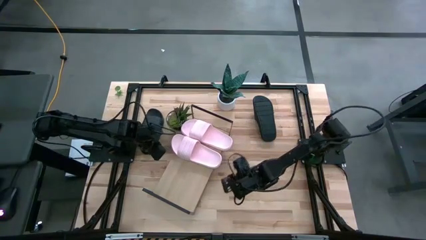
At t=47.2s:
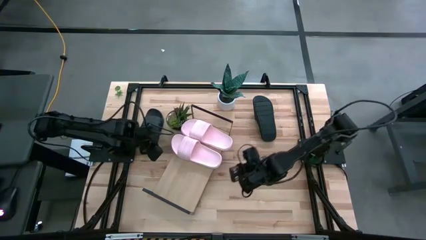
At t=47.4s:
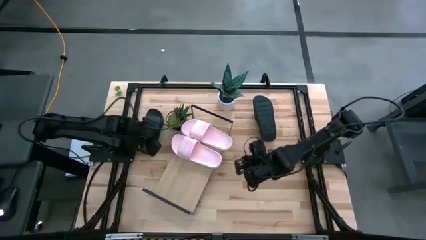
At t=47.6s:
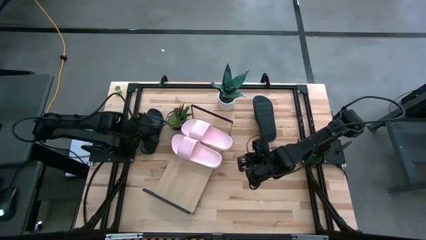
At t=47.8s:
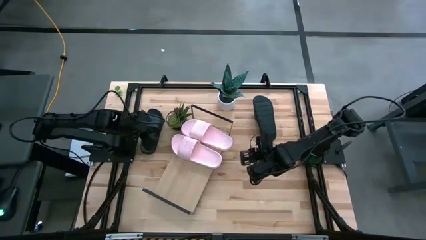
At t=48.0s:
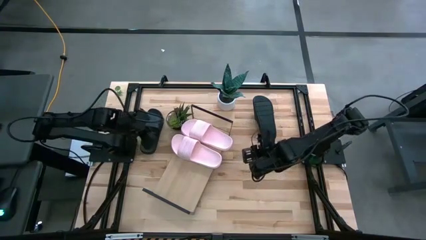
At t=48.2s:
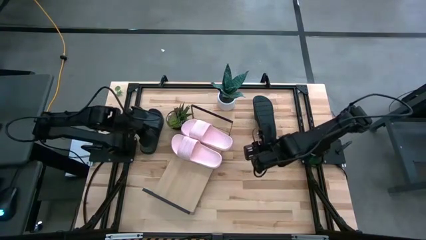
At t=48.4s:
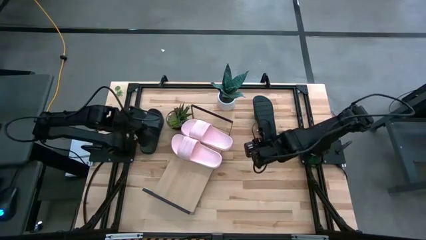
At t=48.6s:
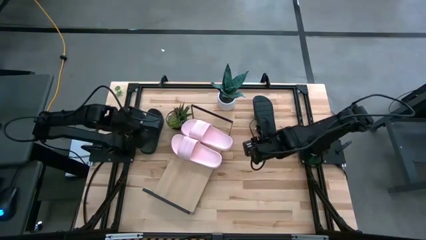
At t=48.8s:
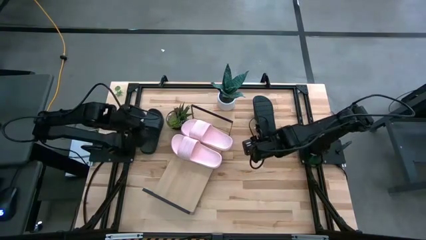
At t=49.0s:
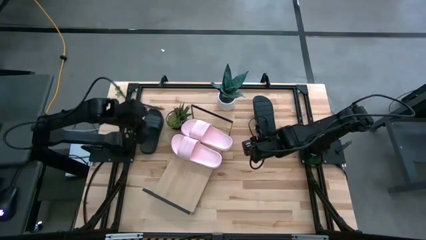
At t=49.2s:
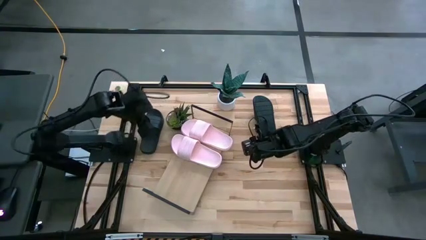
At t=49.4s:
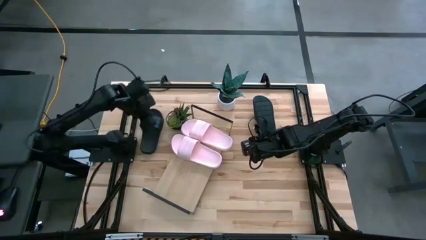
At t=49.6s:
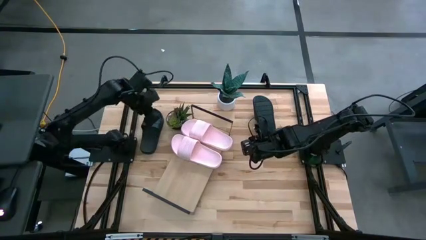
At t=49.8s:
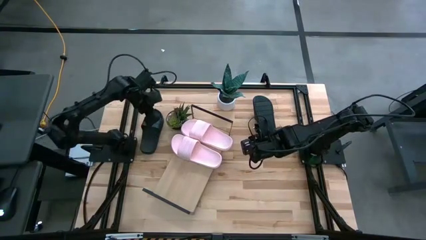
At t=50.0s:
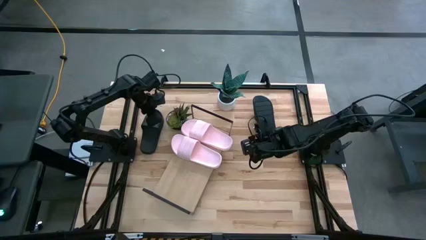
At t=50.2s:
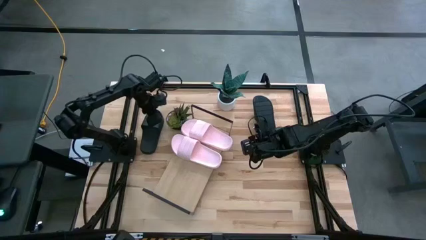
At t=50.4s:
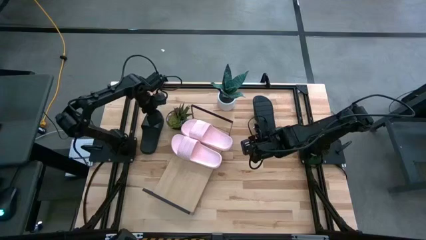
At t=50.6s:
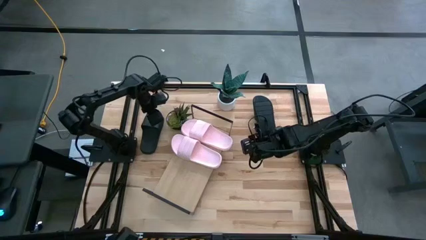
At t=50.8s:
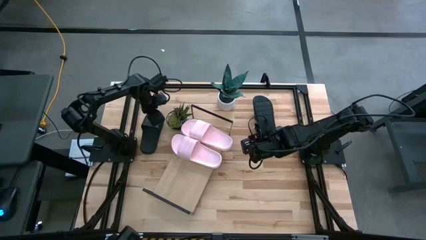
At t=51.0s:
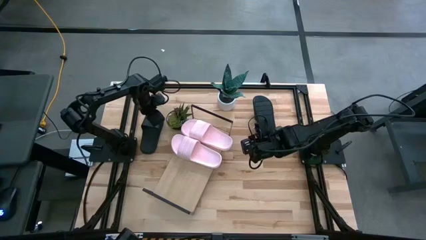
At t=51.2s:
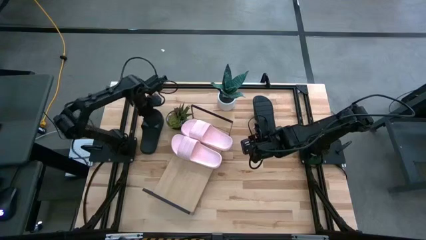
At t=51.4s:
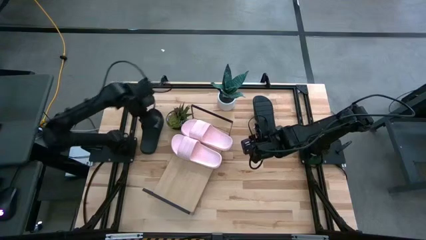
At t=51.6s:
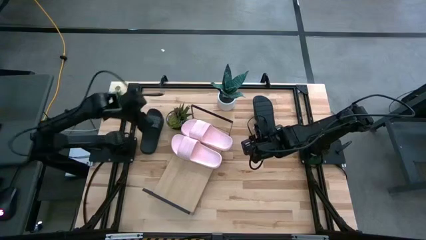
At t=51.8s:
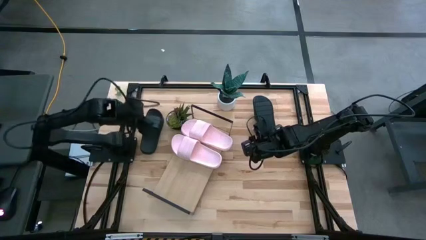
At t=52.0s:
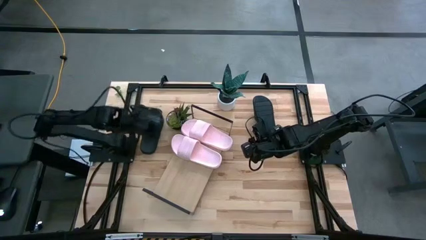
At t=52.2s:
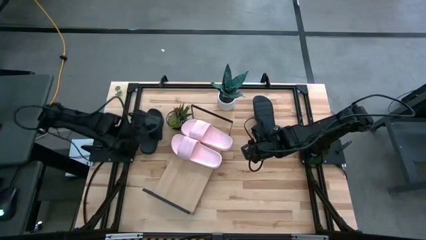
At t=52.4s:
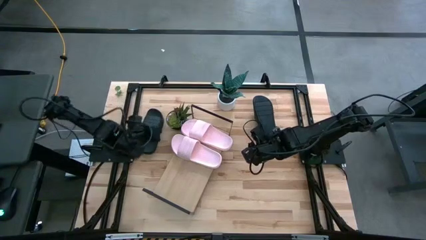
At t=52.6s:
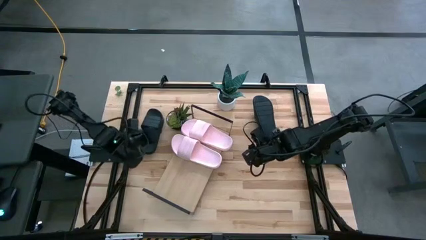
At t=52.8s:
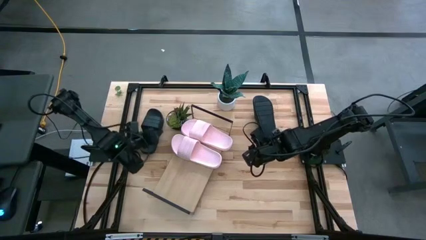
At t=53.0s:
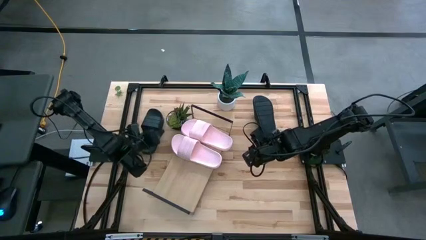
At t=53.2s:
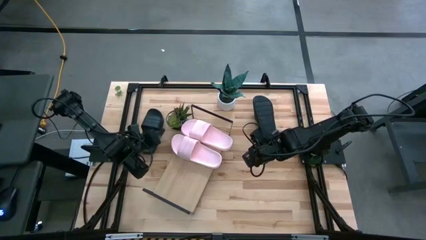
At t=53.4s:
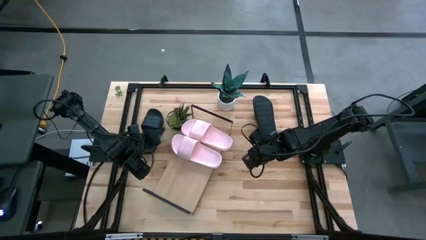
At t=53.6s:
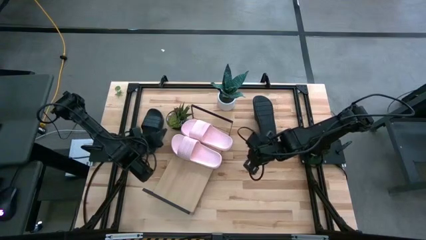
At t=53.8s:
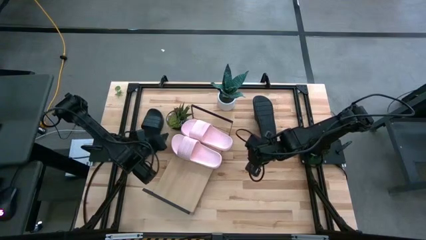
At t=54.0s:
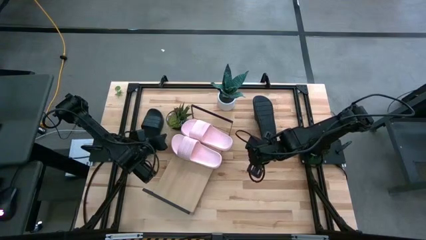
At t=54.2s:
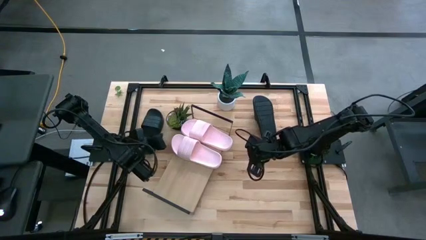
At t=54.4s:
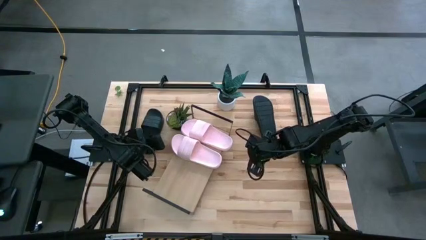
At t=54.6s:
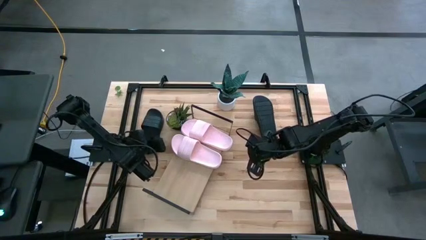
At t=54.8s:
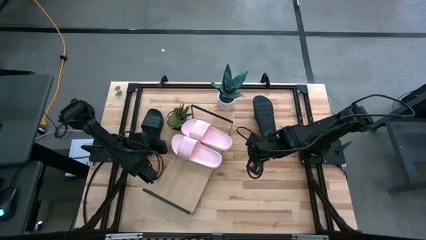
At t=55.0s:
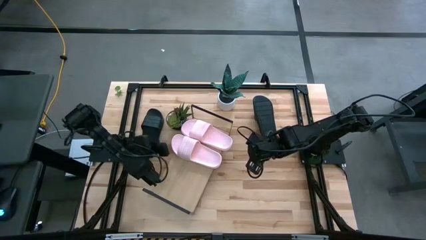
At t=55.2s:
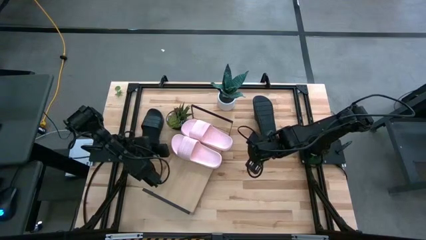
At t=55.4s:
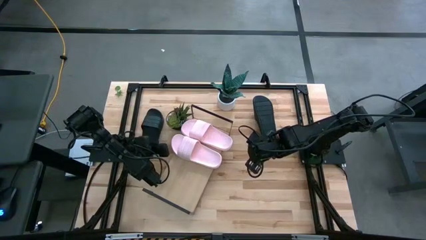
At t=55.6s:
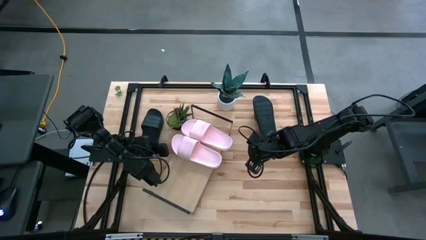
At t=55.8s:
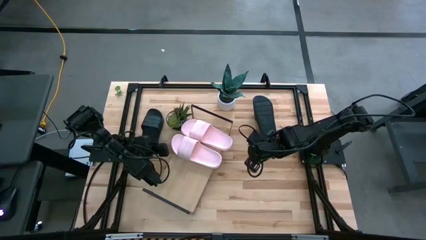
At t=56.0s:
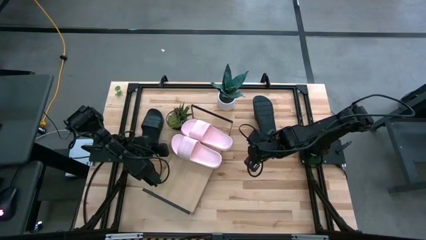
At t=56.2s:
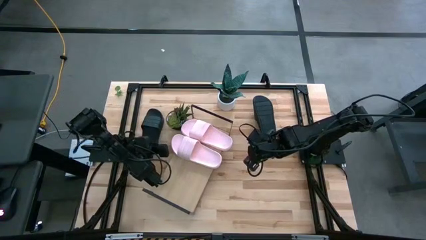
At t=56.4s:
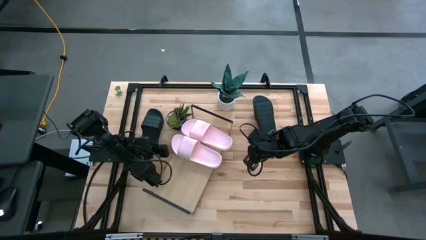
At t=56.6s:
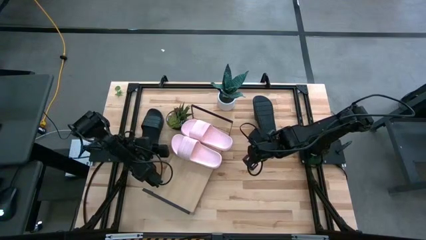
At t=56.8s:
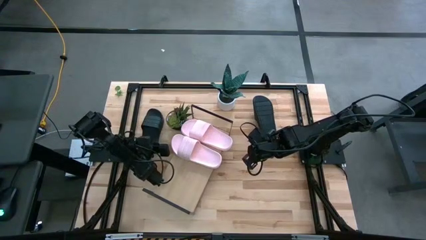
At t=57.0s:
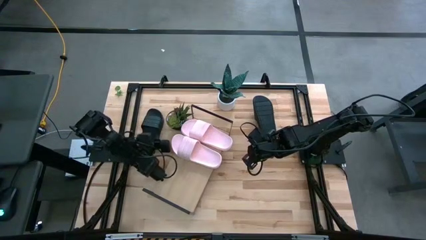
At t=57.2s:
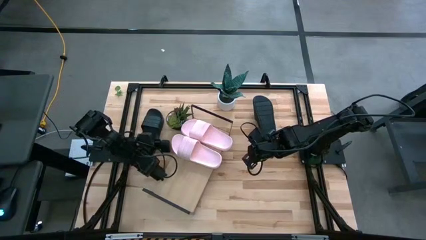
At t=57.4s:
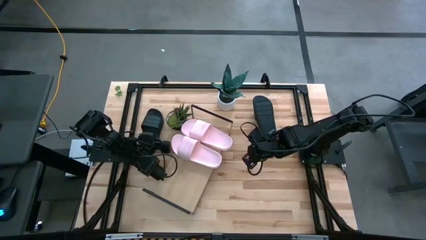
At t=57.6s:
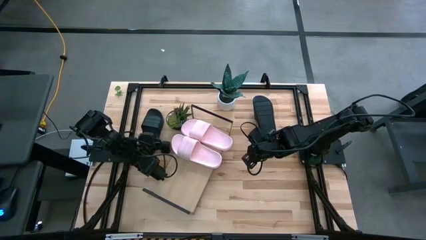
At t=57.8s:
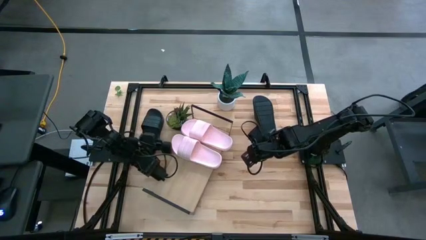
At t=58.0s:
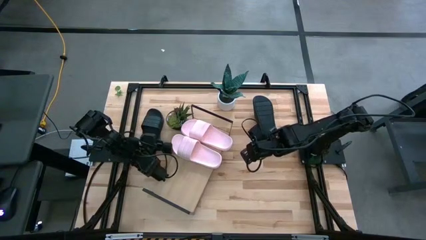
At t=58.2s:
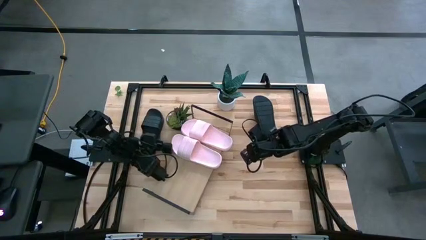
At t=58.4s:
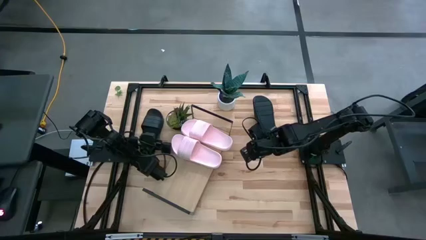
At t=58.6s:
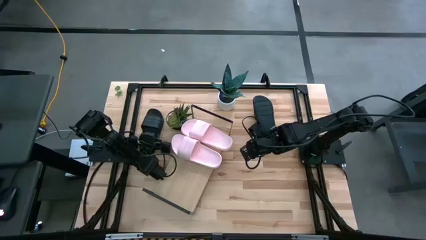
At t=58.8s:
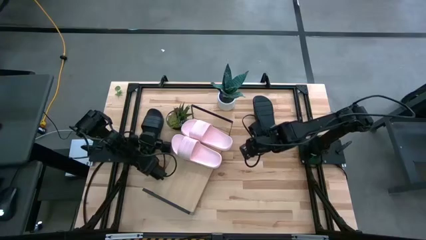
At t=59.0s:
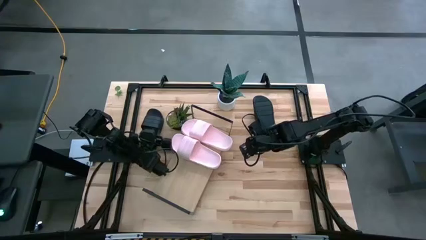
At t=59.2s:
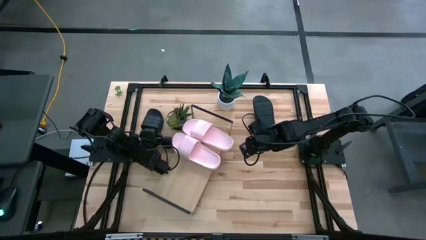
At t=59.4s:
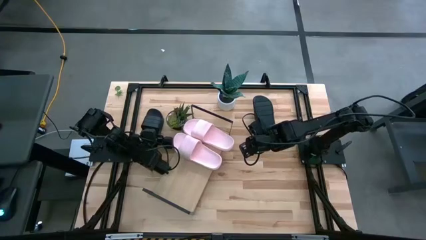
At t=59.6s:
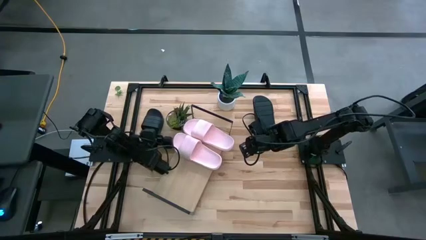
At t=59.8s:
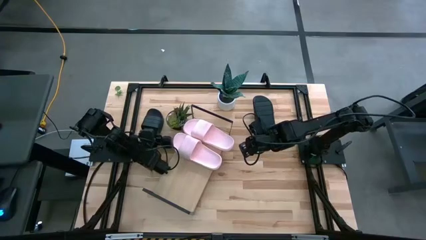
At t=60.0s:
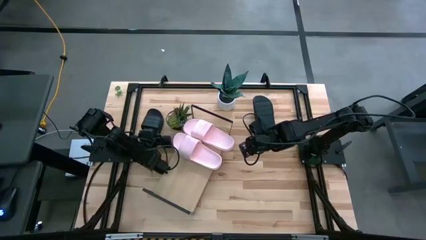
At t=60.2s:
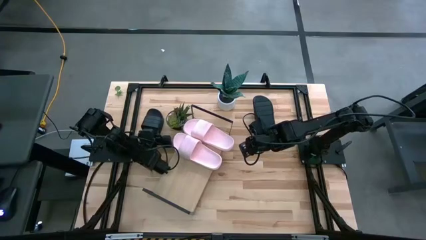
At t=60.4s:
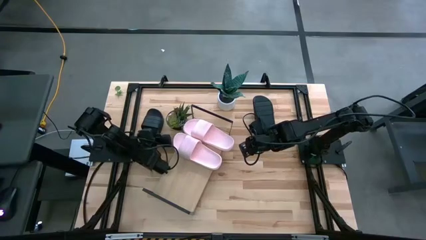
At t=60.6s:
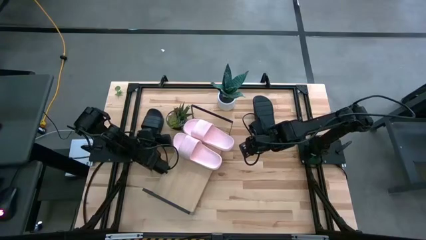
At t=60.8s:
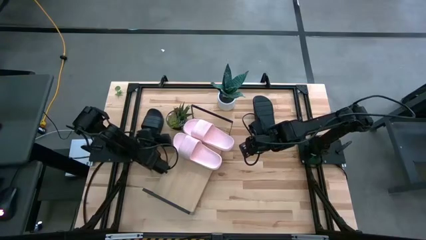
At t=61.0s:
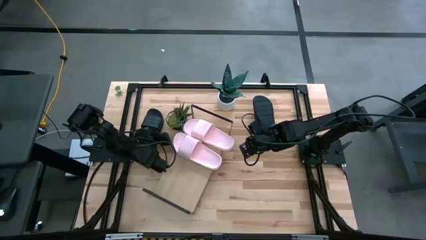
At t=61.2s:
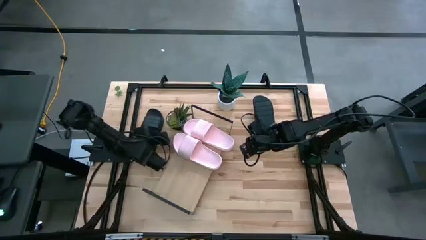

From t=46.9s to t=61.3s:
Task: Pick and place slides into the shelf
Put the left black slide on the shelf

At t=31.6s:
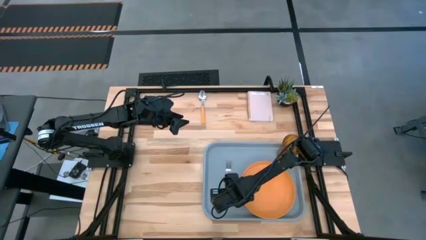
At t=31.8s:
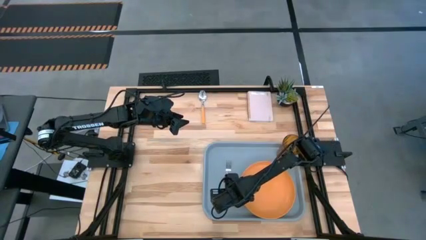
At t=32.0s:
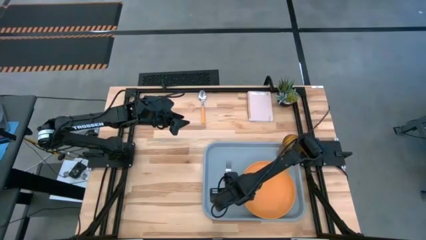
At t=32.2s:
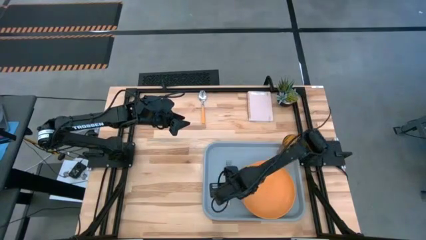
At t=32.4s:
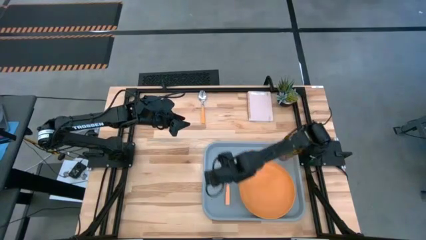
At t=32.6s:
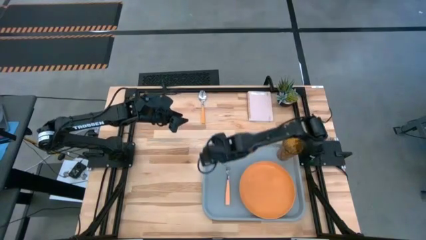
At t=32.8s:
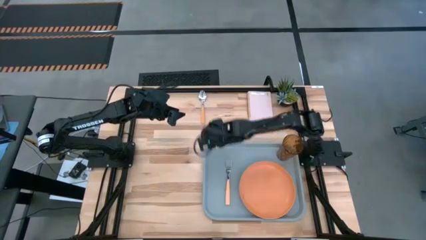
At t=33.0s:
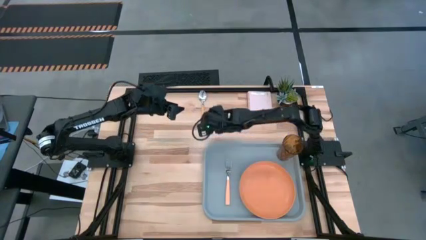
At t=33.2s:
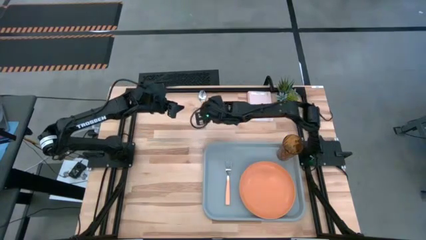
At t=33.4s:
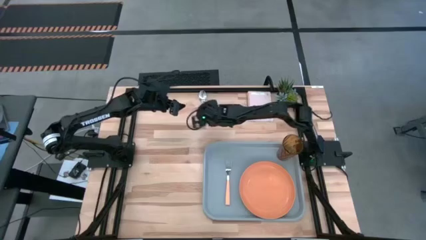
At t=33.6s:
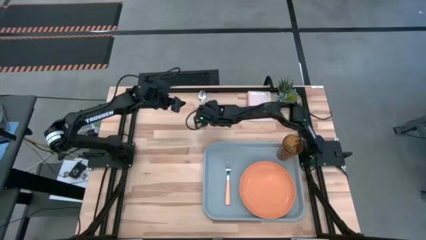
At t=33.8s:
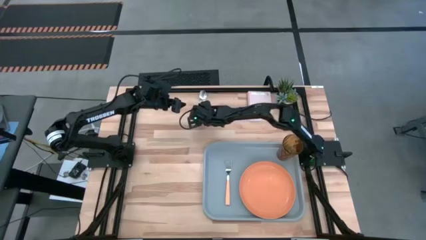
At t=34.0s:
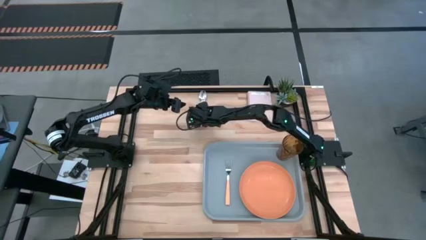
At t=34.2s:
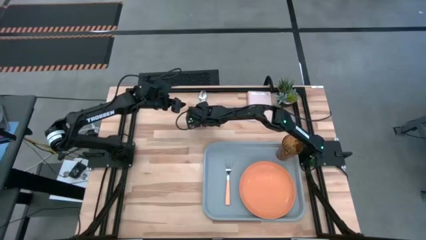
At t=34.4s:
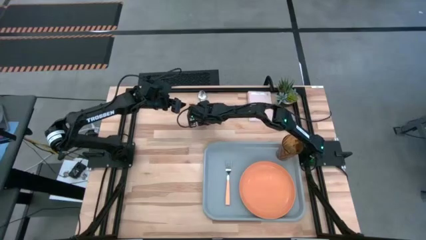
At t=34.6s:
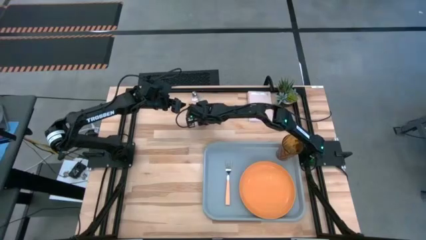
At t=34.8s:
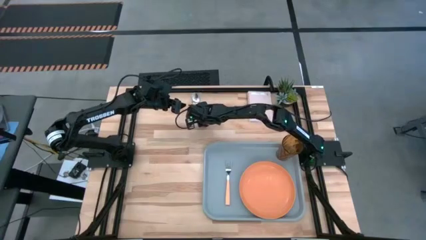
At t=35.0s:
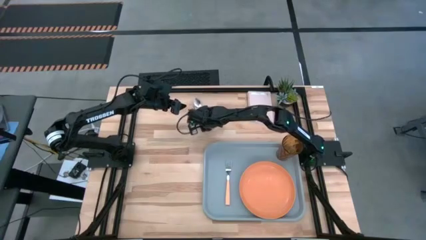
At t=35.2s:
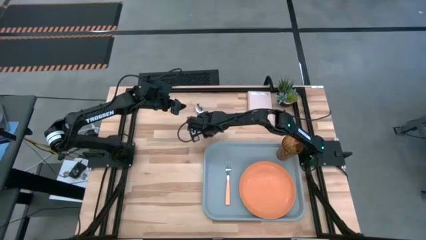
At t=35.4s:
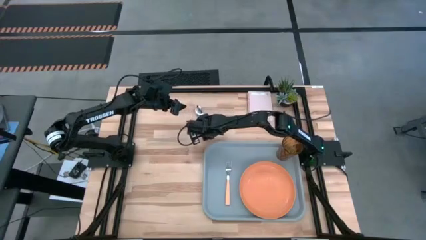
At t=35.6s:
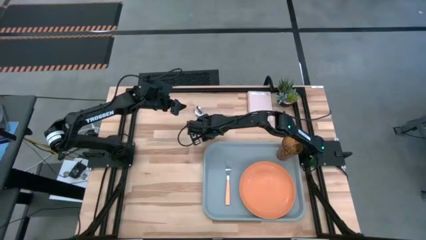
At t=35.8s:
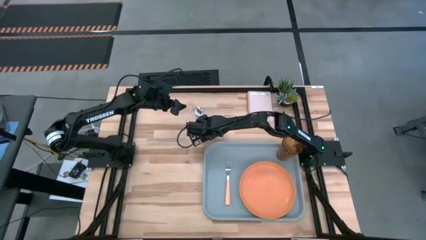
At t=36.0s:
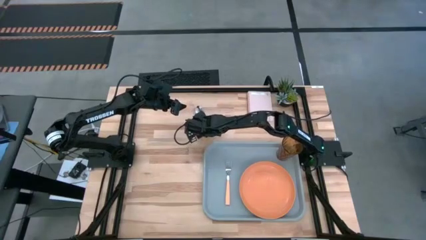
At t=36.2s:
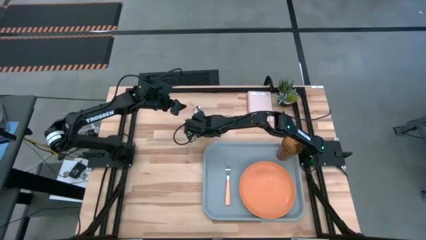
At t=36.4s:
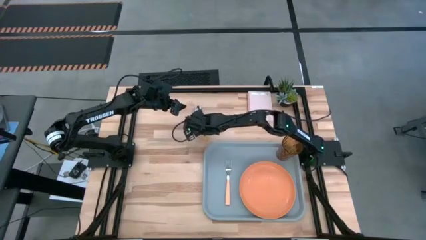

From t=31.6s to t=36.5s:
Task: Pick and place plate/cup/fork/spoon on tray
Put the orange spoon on the gray serving tray, beside the orange fork
